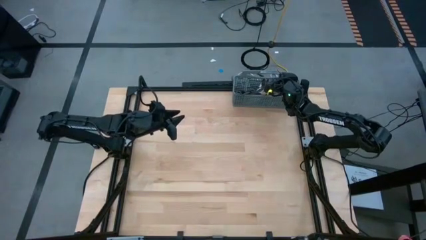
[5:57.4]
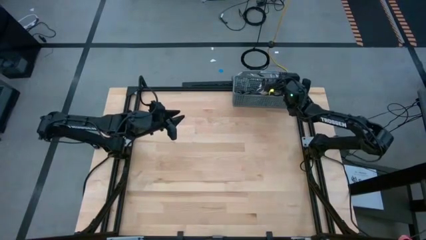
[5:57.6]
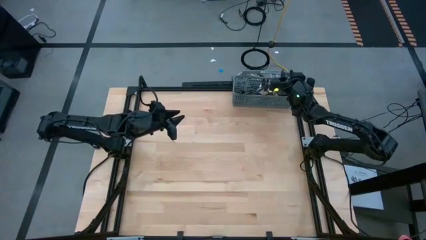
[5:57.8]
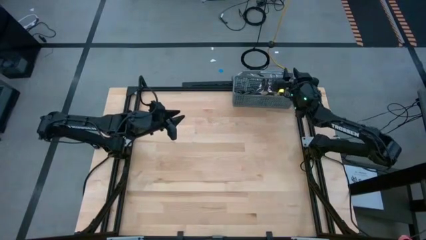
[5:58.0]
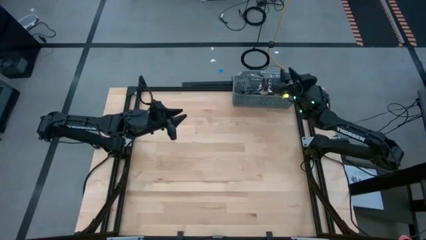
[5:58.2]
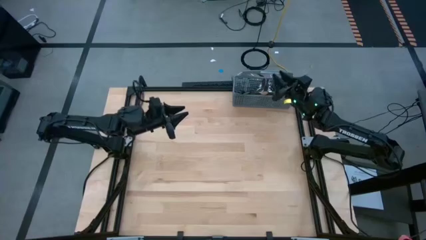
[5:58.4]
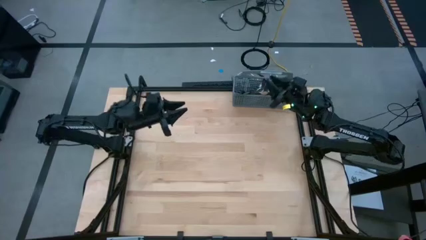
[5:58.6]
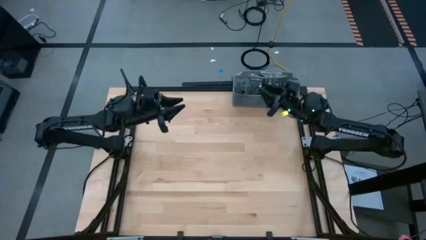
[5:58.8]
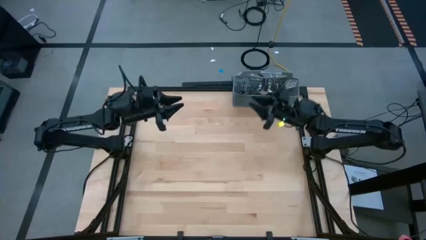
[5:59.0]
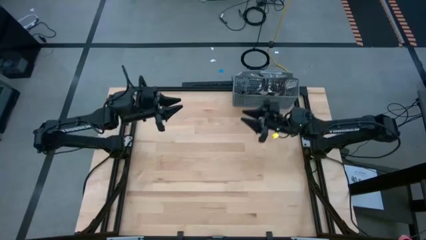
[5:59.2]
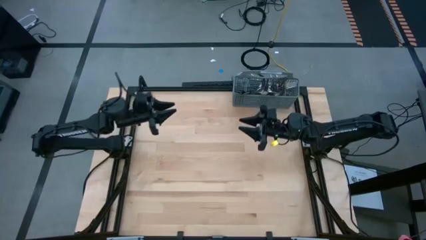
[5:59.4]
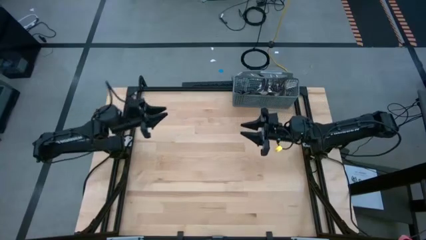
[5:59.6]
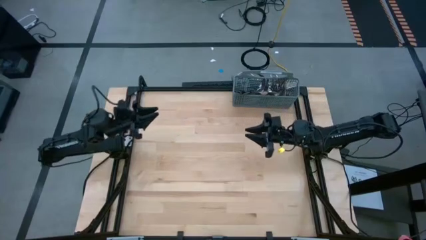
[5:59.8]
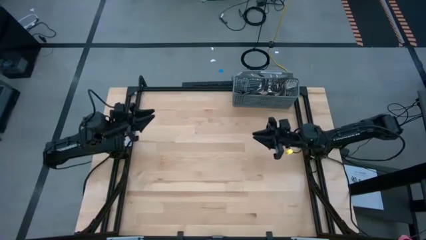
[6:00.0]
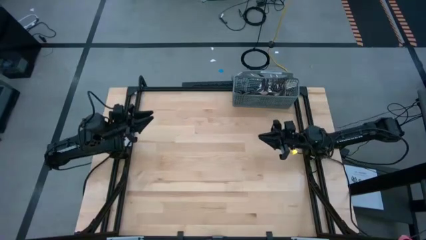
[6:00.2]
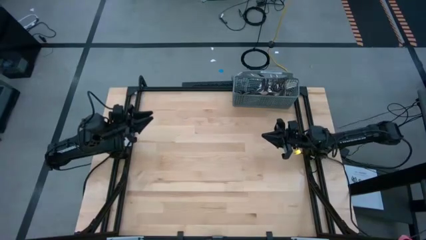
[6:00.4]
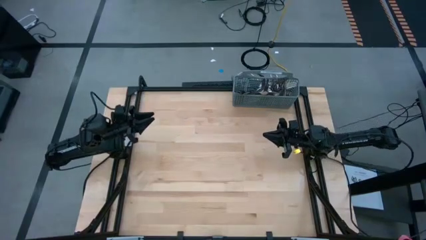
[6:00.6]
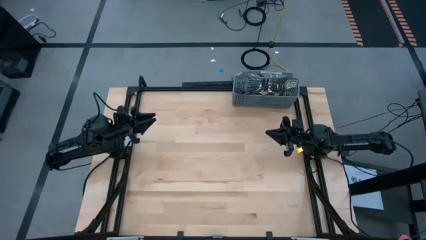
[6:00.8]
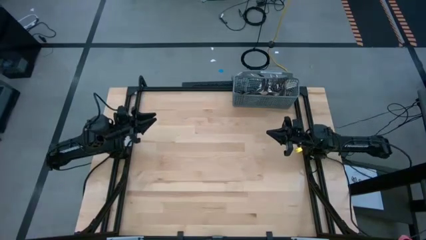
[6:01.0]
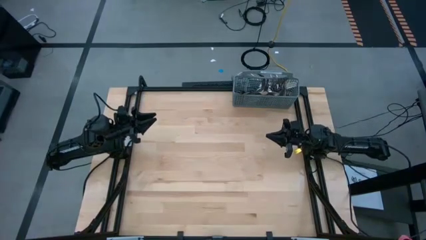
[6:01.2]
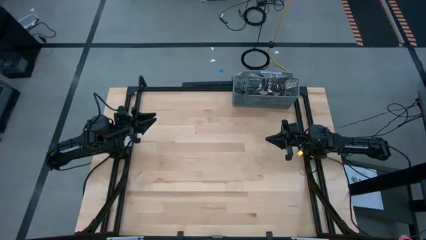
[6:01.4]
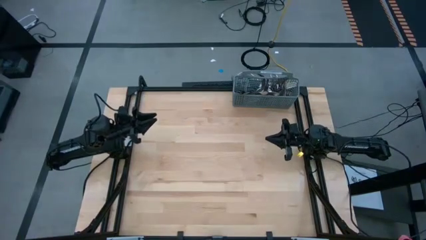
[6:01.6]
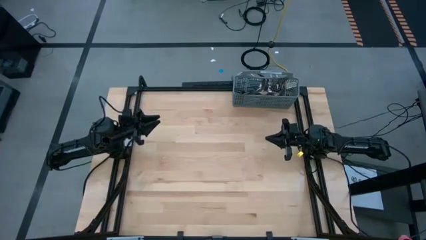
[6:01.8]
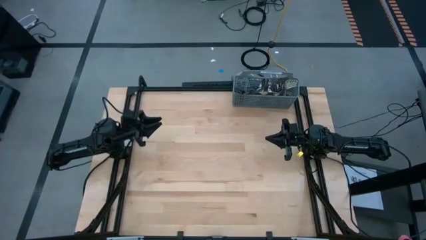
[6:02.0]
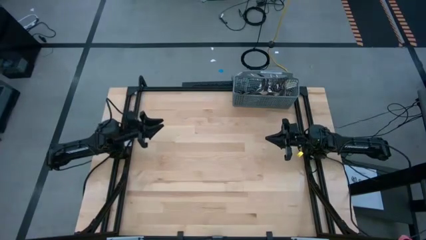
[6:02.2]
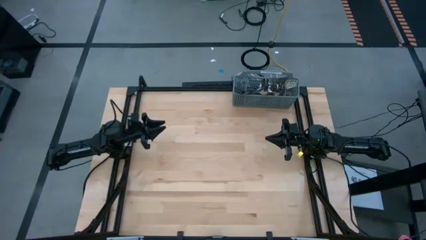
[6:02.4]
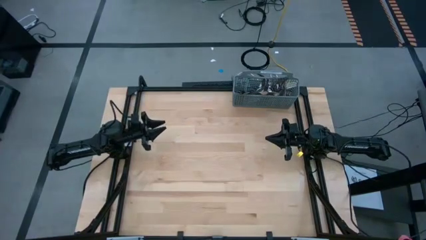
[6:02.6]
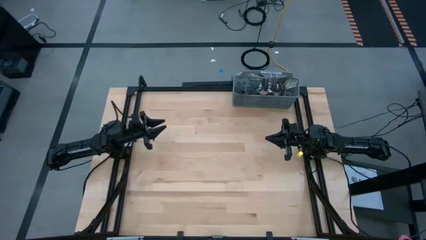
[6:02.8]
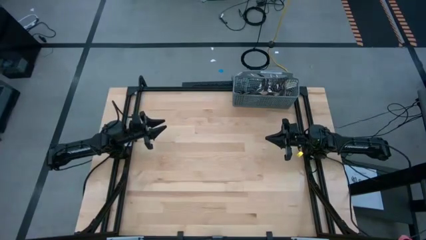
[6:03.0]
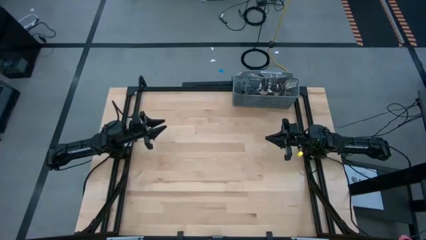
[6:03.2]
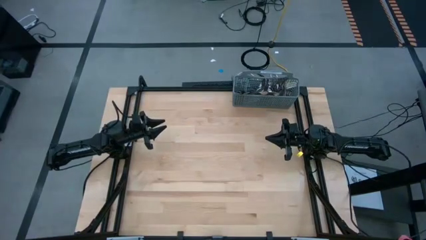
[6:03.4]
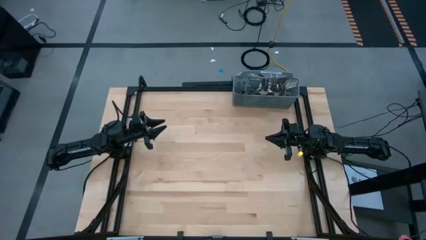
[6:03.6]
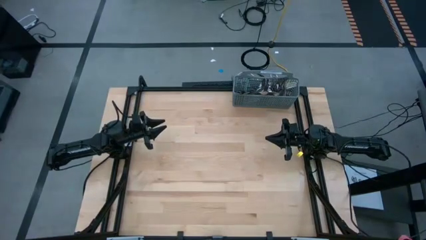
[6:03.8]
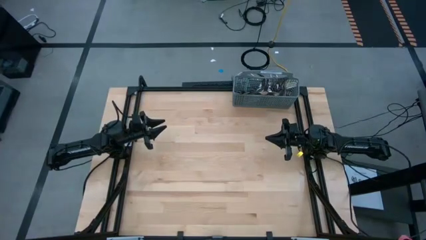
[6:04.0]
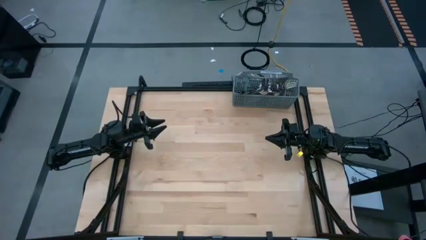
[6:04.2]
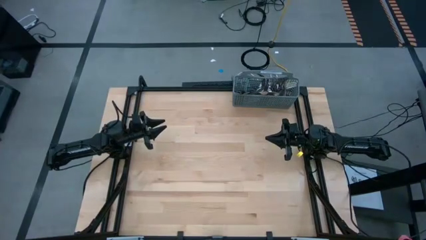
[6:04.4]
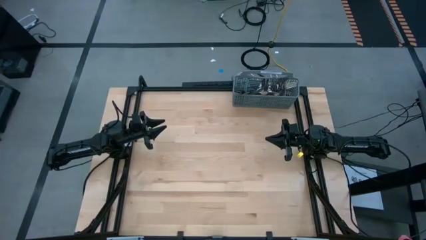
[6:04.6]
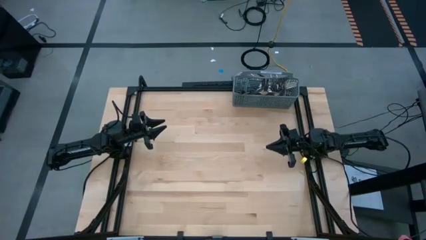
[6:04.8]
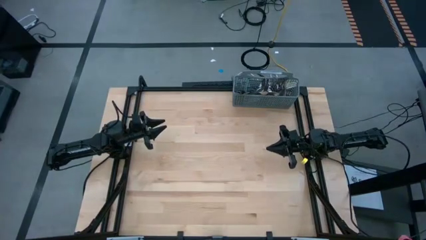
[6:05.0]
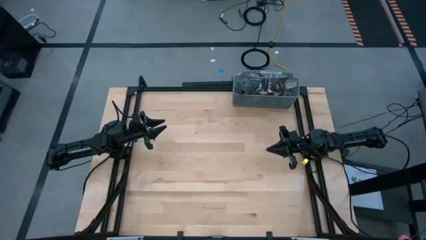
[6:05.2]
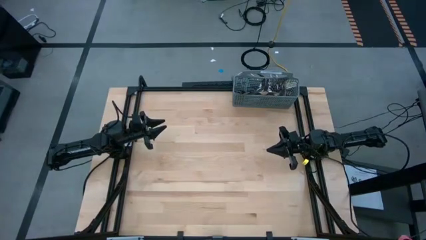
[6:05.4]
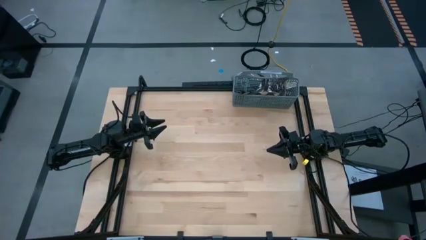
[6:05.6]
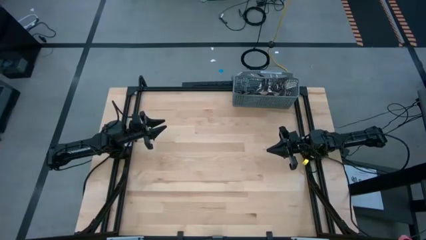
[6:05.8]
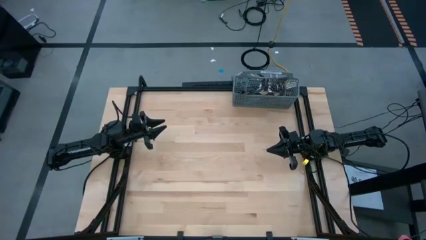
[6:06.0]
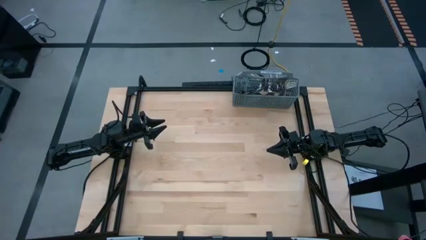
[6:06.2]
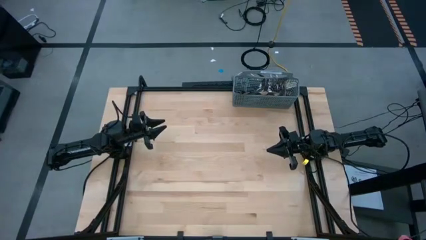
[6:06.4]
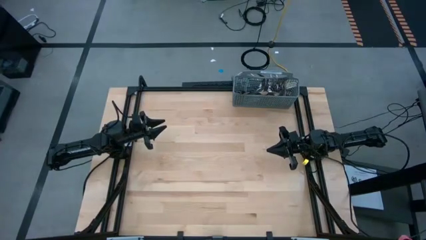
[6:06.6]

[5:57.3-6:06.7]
Task: Sort silverware
Return to Home Position

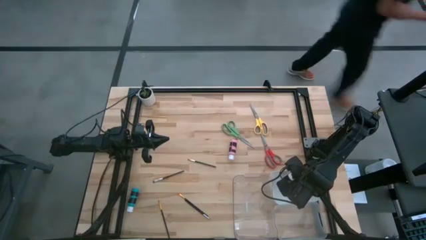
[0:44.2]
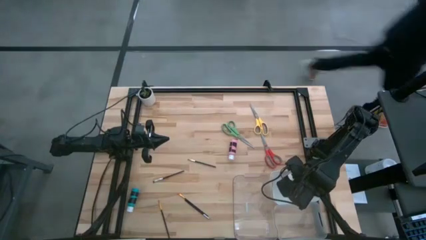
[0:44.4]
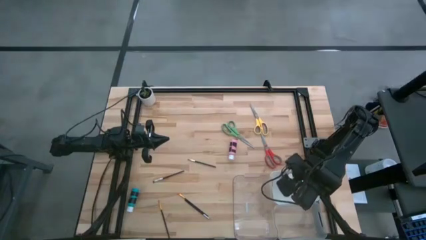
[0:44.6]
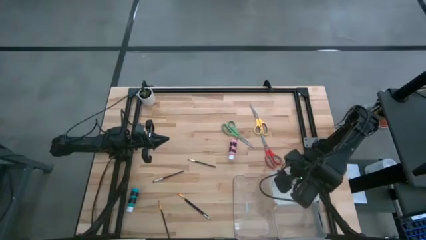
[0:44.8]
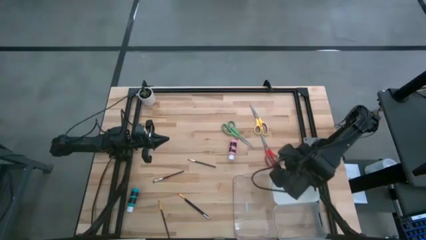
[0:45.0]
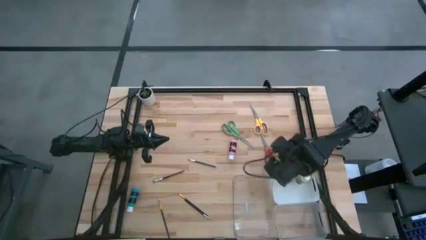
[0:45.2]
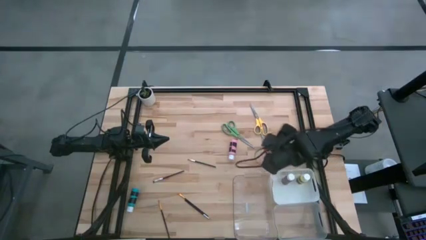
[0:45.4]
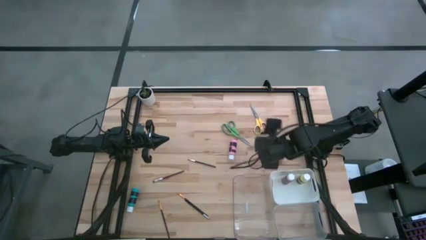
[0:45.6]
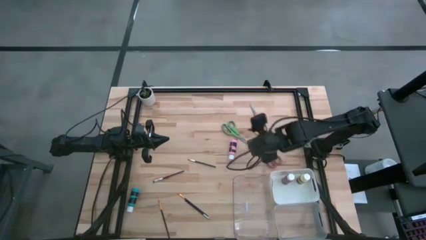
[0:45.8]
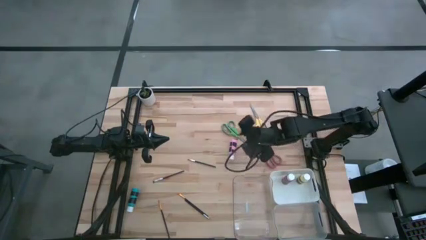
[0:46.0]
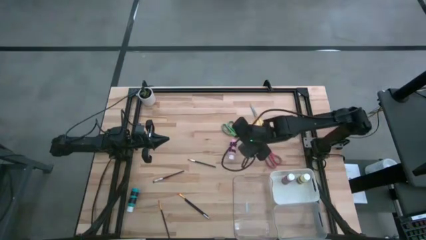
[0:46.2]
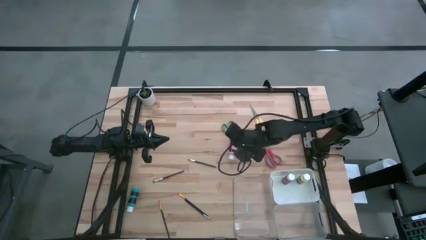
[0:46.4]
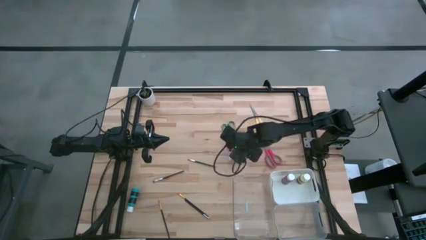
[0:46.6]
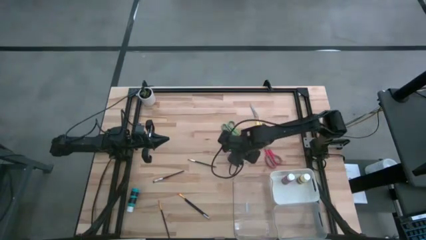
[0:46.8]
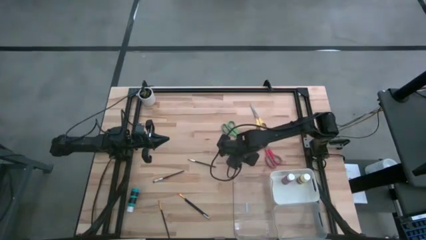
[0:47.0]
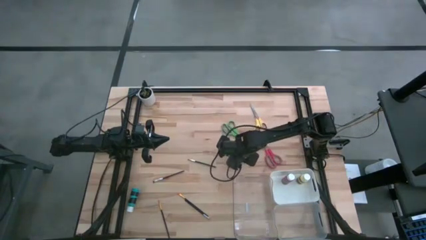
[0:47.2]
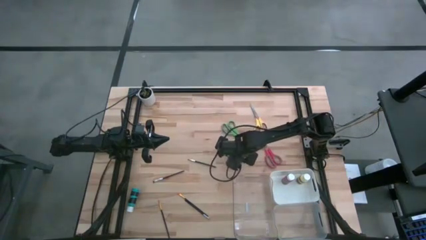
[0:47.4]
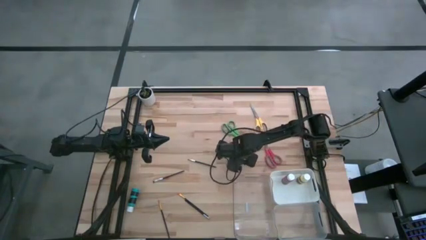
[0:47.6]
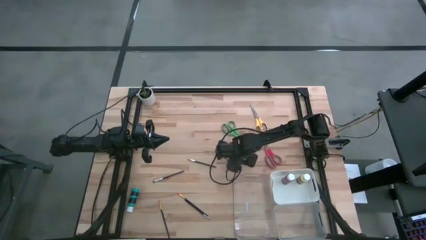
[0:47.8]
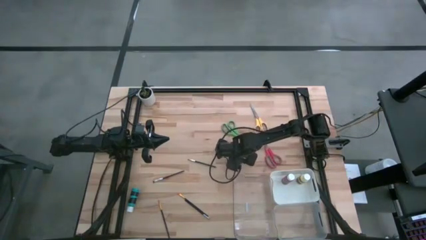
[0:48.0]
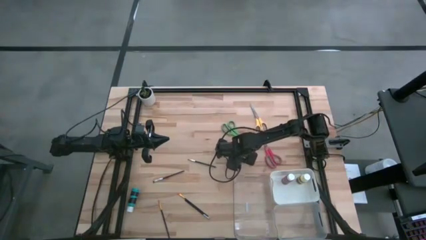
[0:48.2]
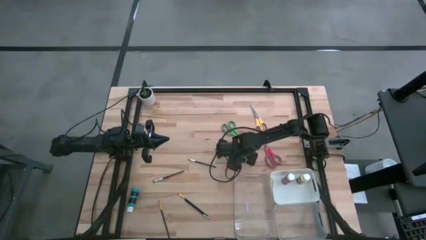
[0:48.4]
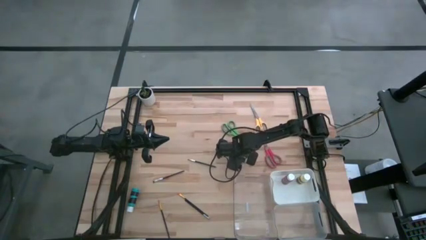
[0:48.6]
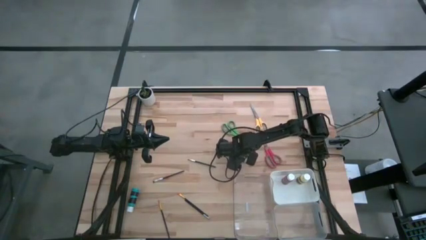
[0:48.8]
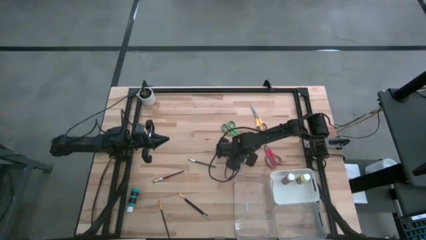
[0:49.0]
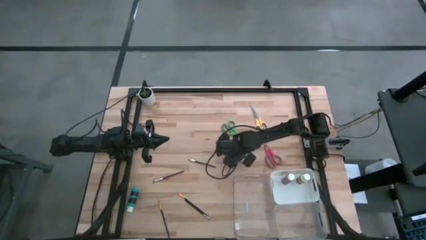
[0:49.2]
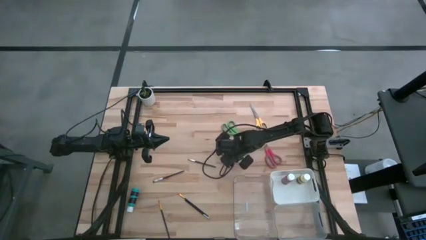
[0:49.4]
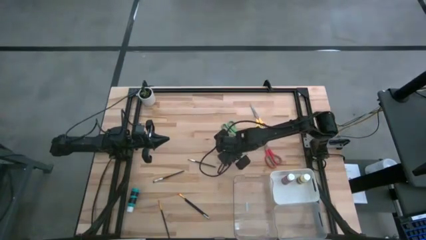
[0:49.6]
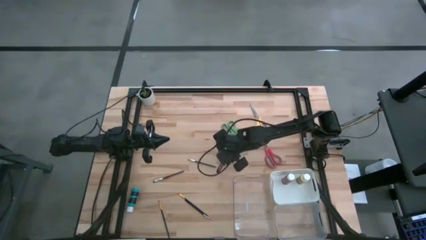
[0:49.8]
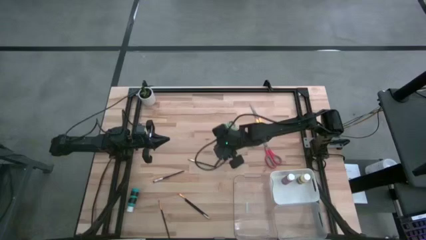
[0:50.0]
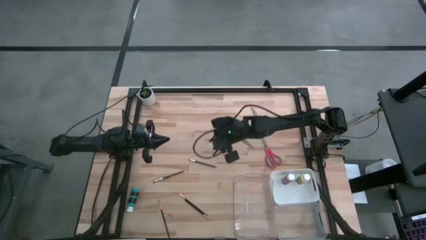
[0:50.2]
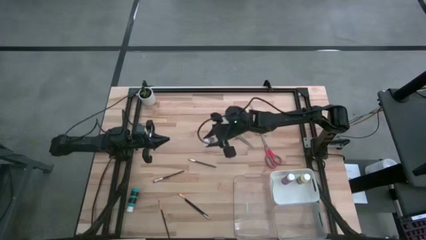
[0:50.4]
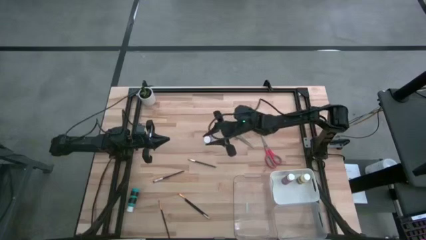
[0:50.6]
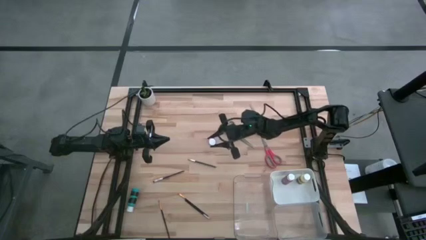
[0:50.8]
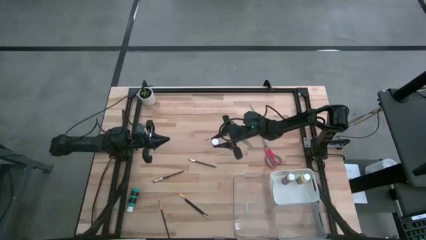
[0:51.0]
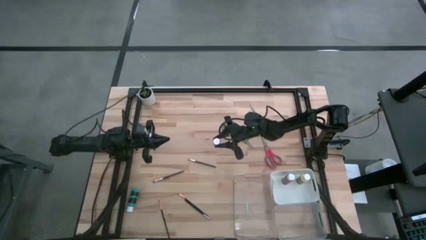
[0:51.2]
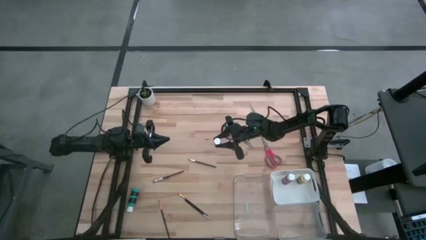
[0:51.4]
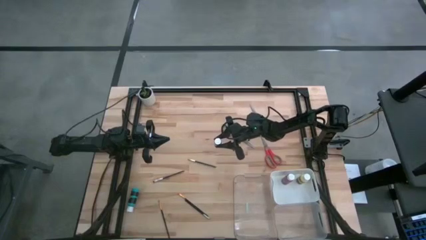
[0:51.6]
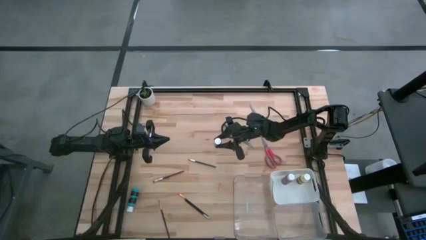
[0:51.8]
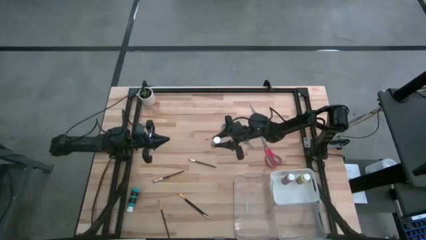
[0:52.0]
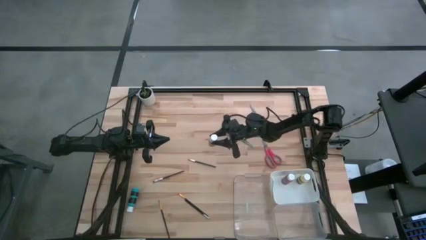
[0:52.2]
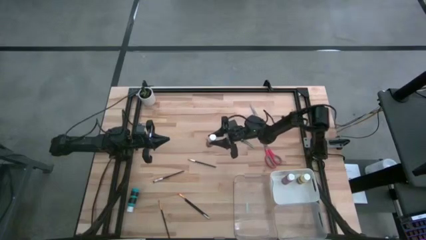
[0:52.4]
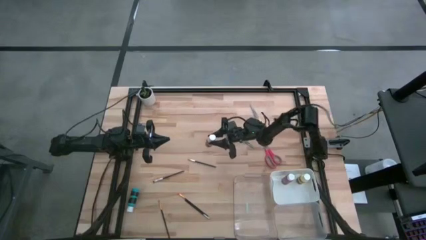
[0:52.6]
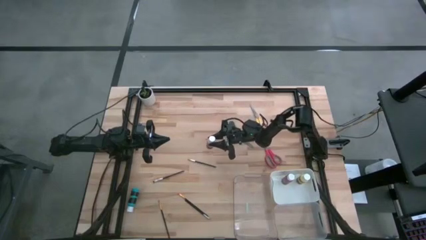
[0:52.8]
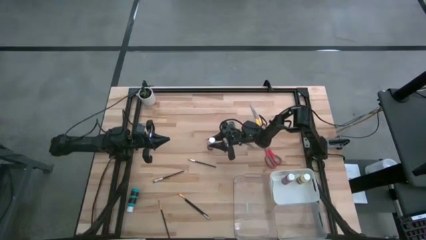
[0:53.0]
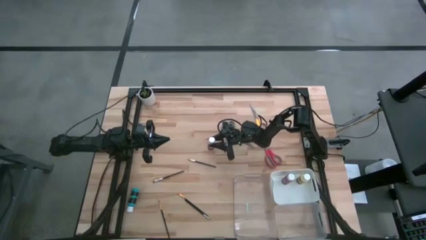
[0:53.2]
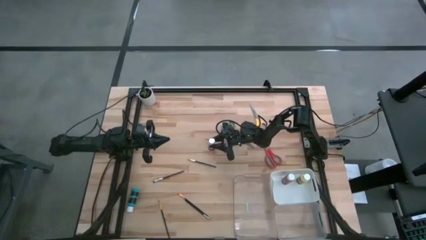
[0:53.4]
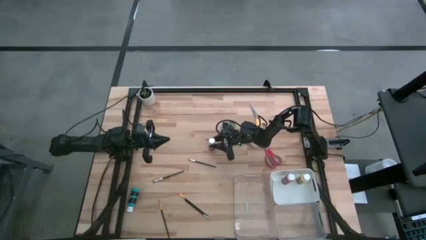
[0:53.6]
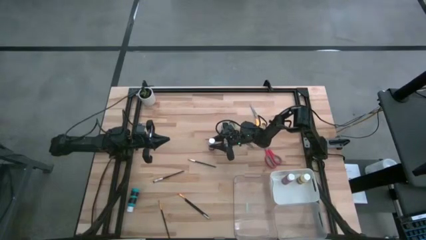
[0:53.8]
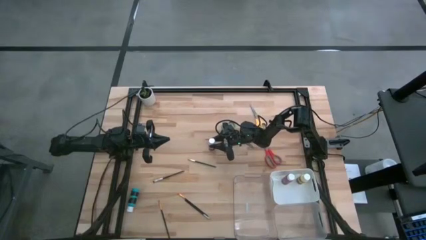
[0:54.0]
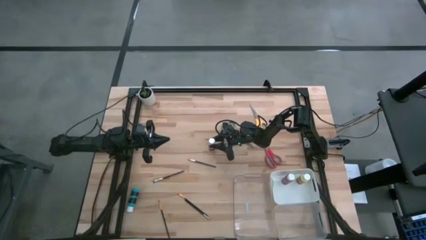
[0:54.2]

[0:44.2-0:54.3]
Task: Pick & Place Paint Supplies
Put the pink paint bottle into the white bin
